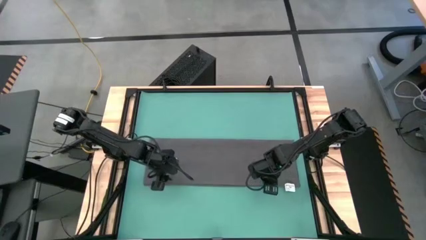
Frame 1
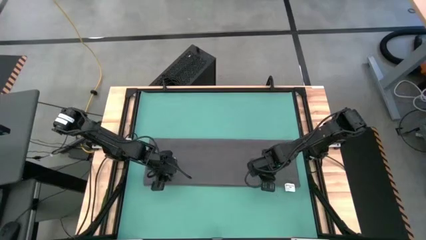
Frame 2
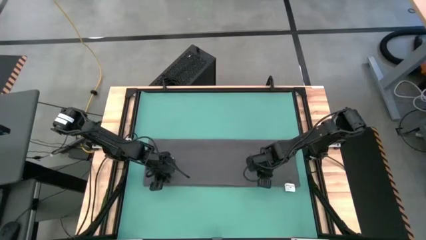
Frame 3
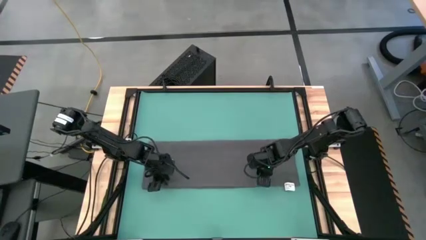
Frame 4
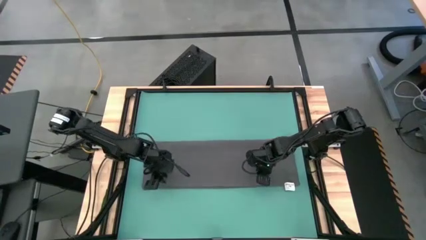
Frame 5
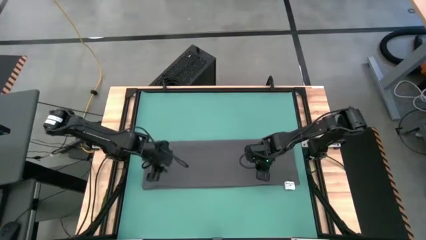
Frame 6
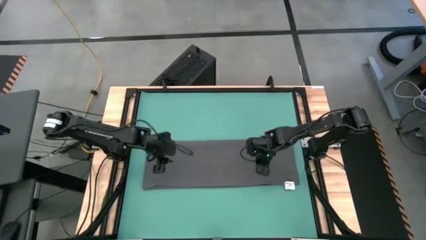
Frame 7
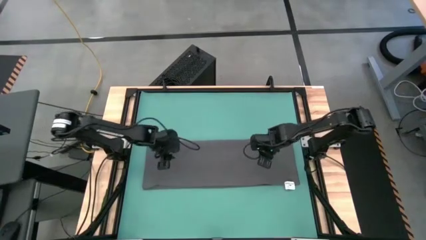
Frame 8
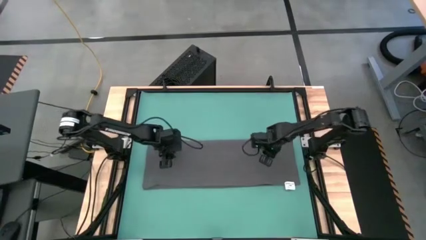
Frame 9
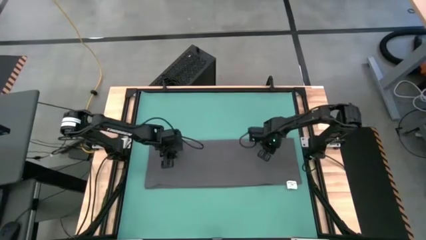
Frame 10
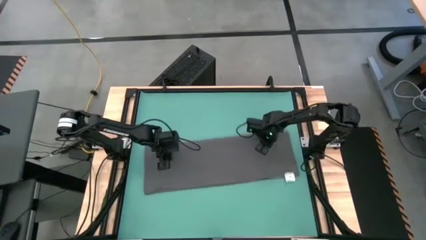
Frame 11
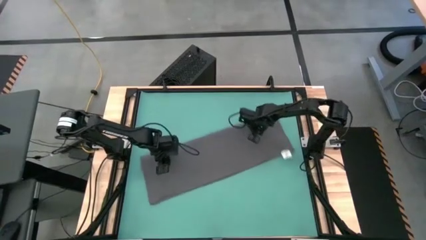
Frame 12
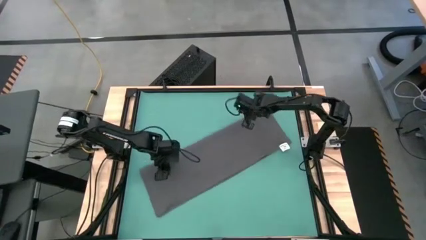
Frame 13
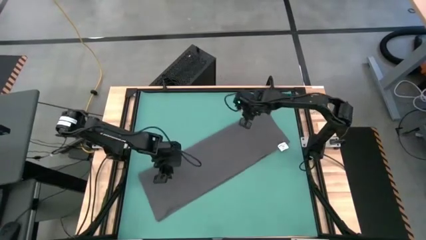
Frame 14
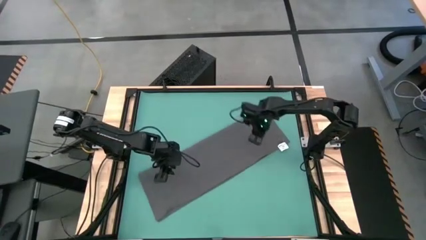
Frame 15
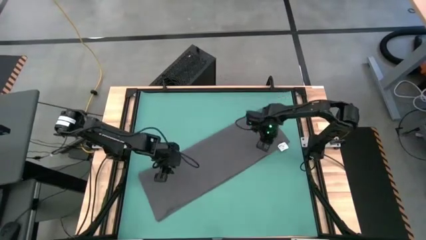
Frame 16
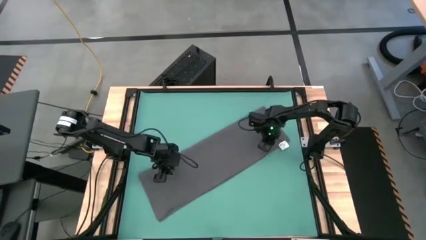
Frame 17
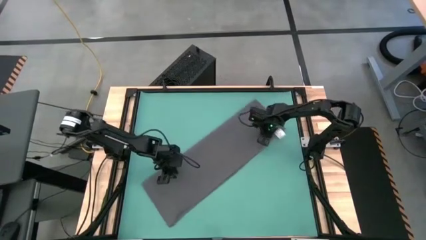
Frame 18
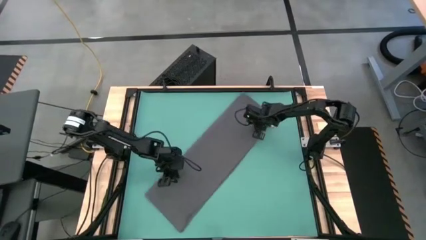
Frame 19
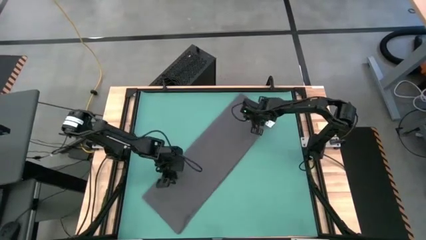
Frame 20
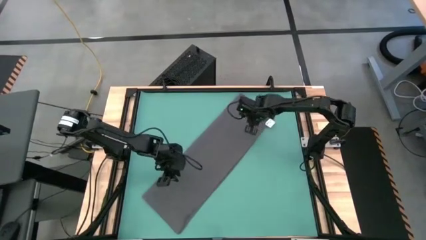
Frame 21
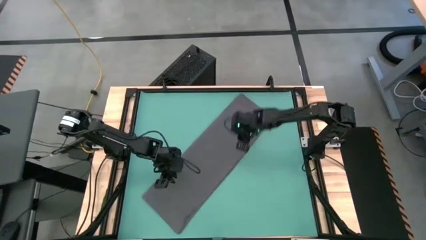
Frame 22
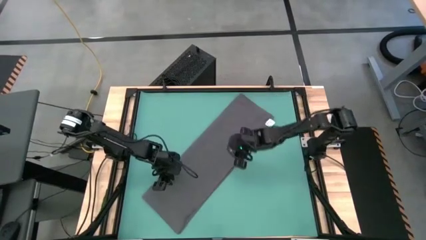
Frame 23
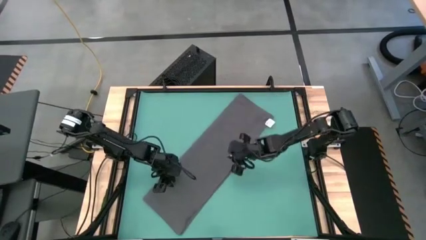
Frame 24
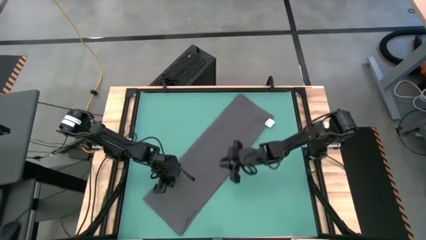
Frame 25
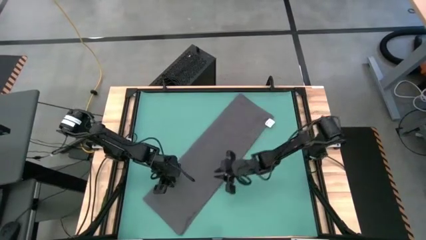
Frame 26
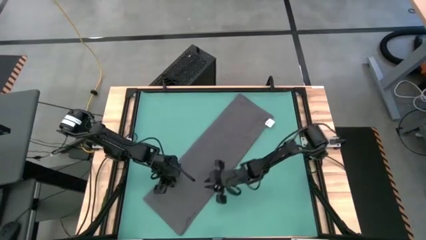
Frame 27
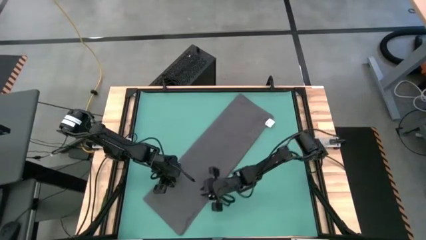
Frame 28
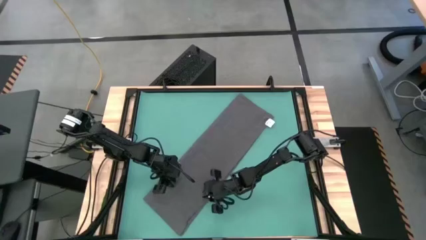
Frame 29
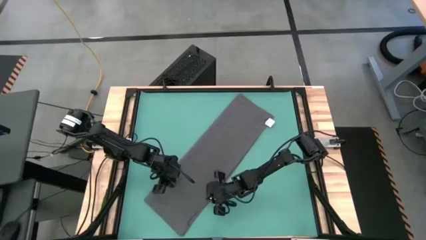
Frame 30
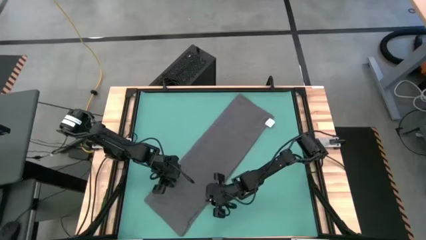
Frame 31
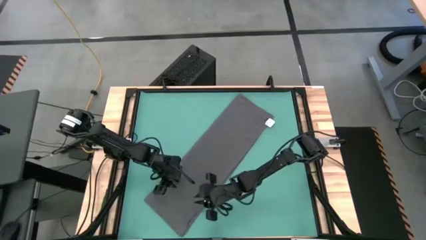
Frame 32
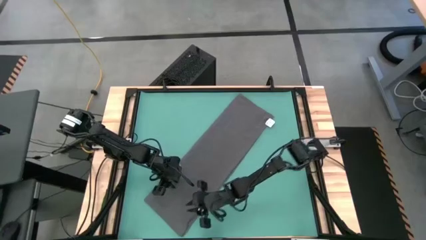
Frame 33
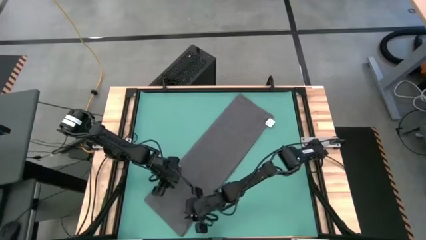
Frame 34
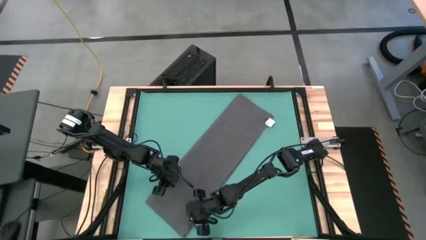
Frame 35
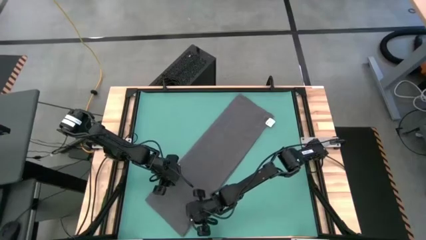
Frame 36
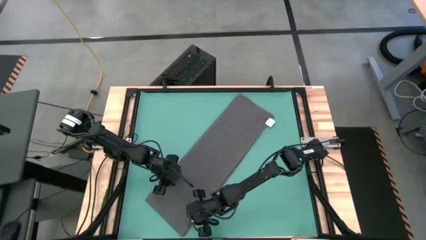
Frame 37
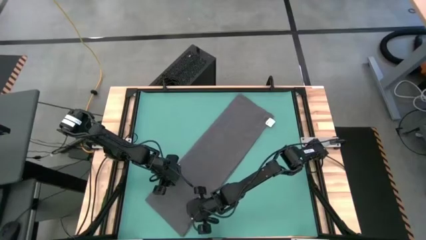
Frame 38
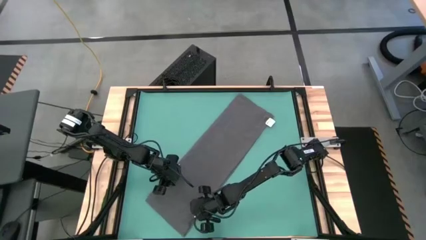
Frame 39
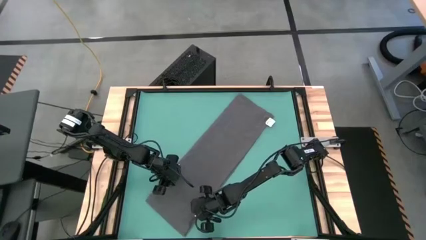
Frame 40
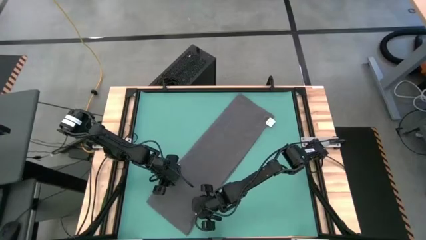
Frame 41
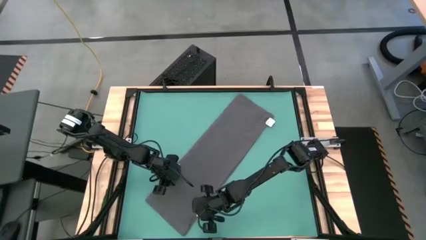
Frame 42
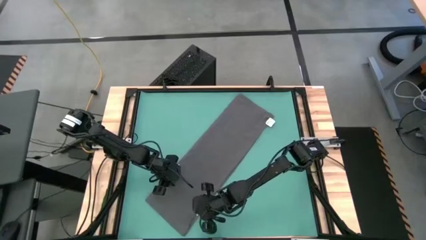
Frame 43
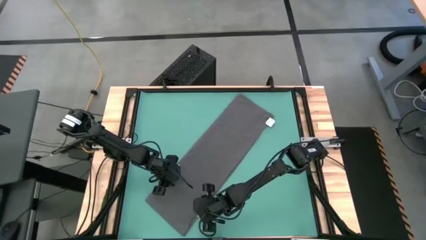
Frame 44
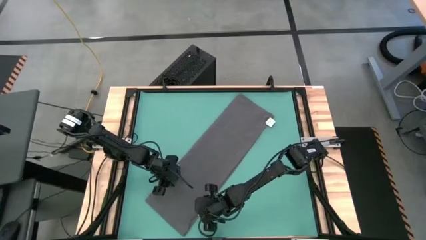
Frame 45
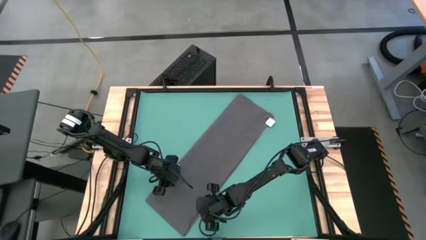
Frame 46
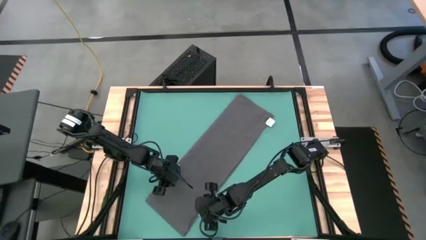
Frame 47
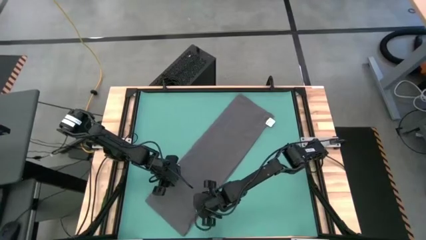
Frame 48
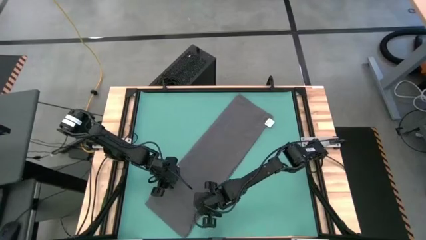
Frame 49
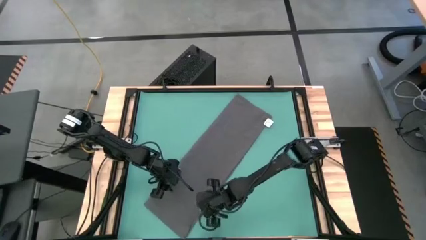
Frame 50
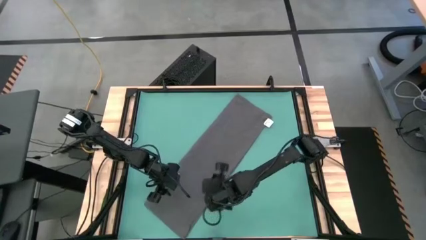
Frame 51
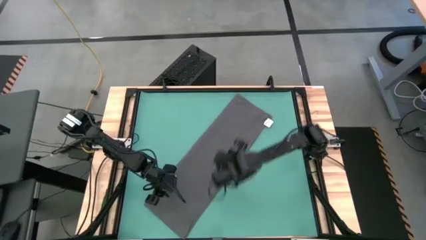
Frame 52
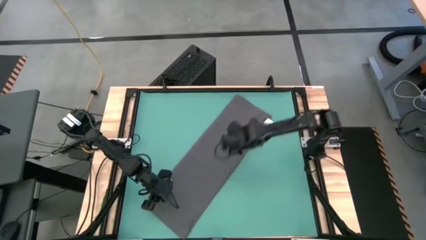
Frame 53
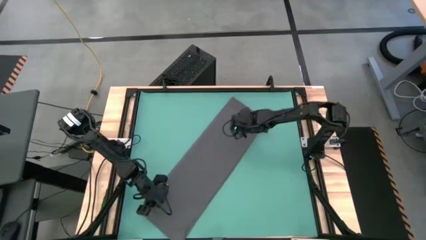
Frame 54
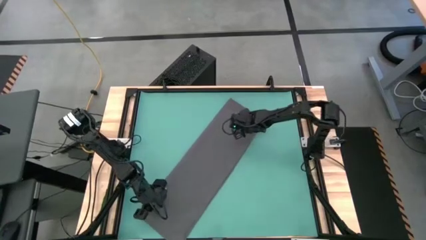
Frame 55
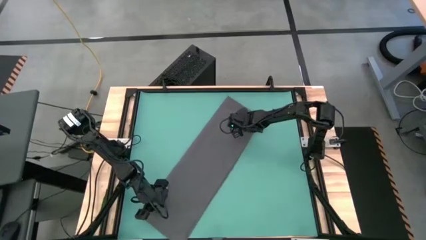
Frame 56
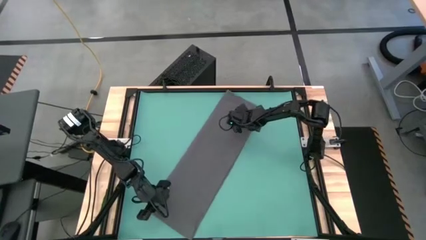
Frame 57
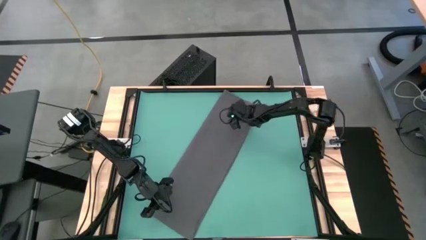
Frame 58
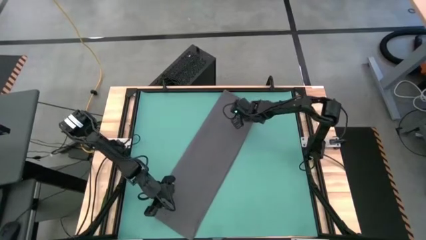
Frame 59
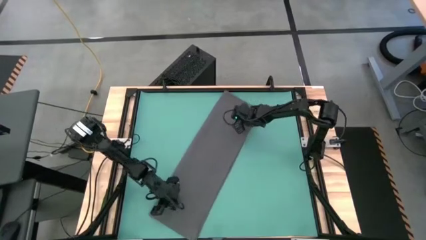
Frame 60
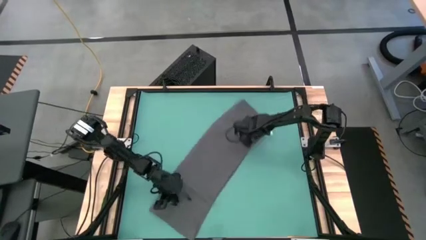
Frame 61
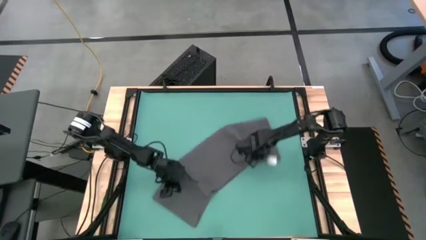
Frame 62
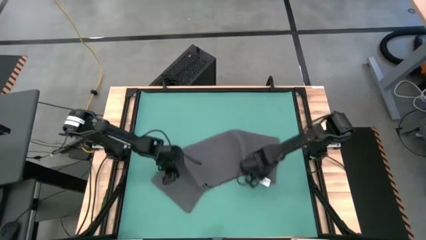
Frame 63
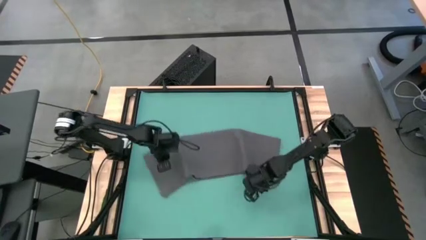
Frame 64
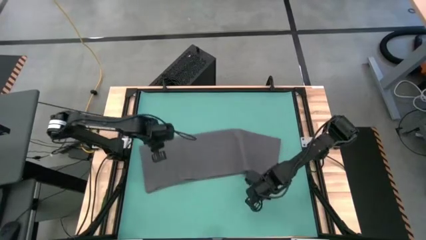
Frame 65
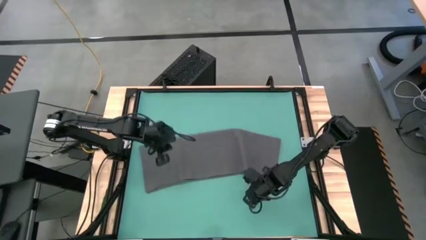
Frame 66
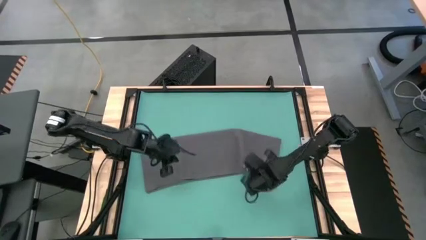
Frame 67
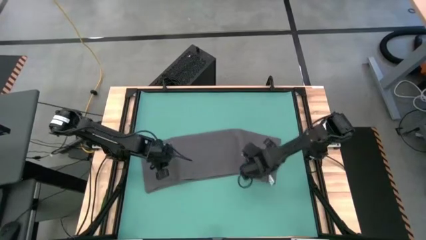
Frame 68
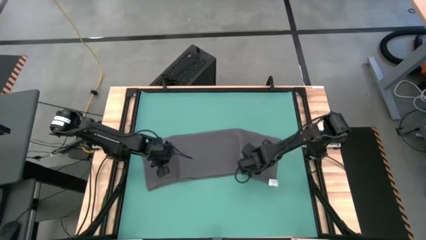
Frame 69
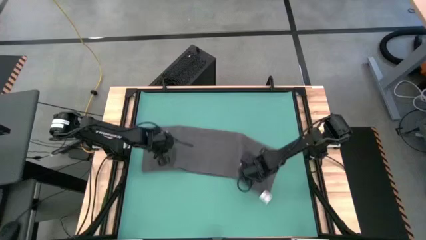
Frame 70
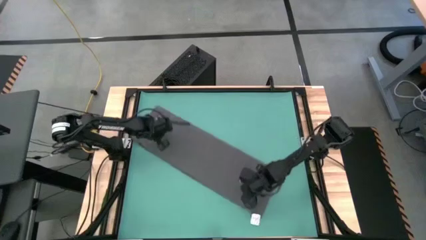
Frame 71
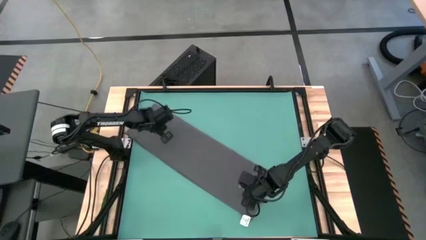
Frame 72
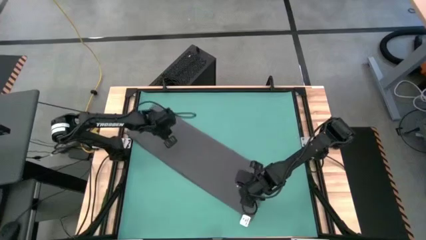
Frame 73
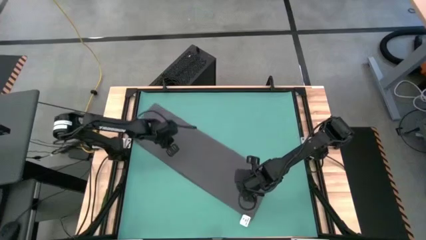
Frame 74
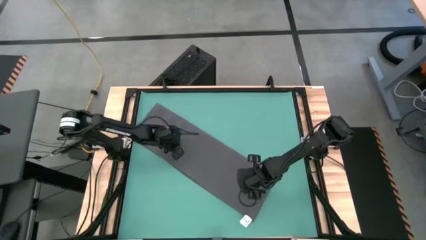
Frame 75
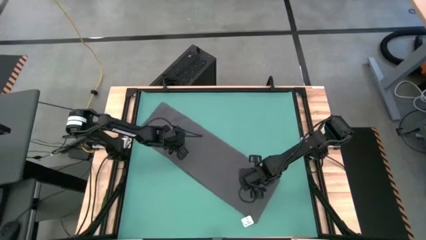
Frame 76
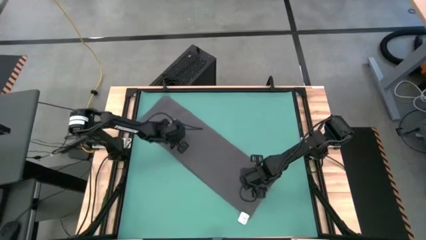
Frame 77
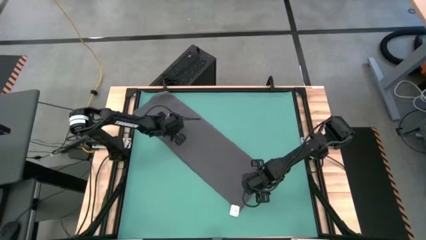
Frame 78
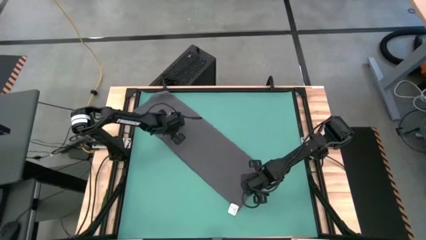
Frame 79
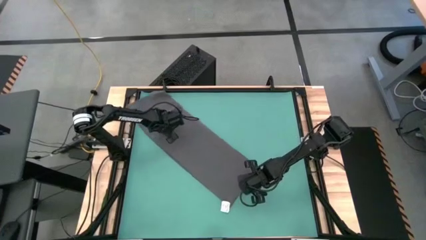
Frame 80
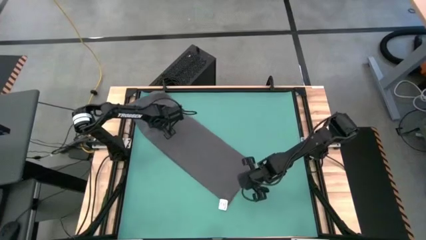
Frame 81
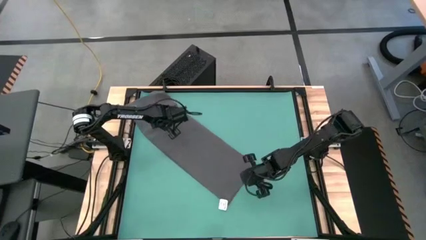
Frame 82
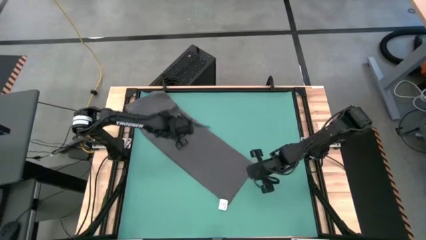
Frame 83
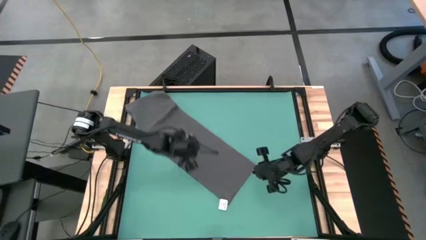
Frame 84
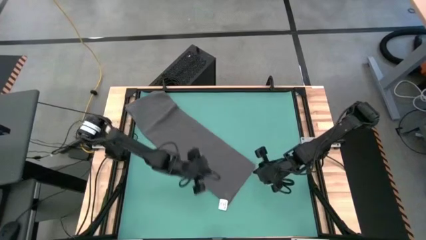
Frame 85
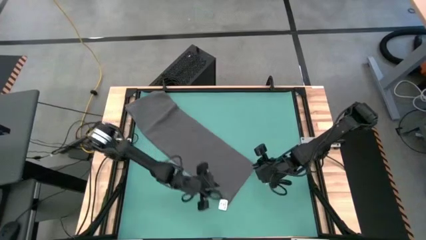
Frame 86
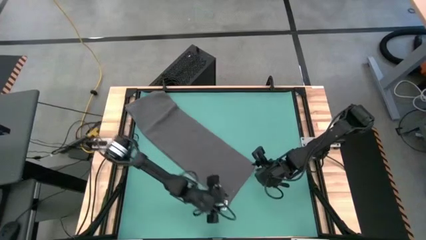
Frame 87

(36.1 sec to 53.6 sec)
Task: Roll towel into tight, uniform cylinder
Roll the gray towel
